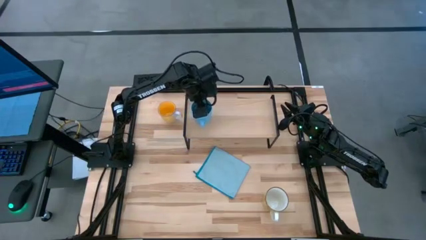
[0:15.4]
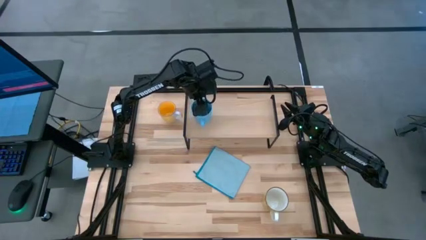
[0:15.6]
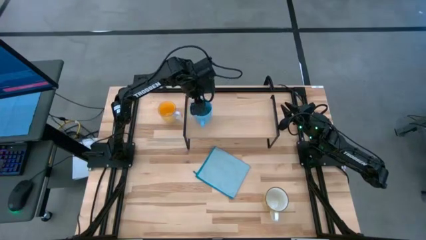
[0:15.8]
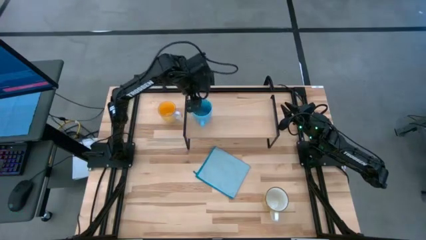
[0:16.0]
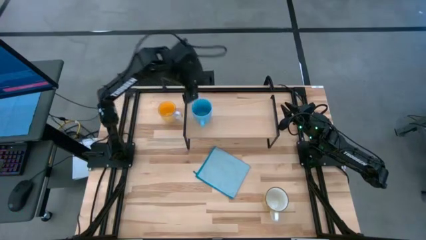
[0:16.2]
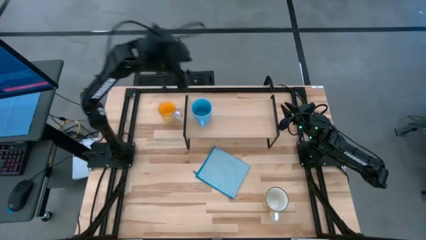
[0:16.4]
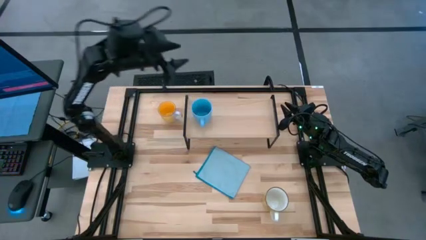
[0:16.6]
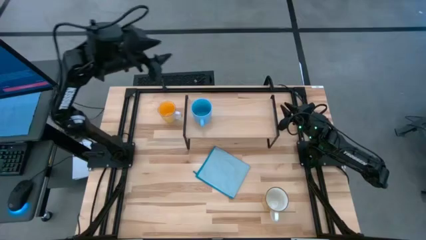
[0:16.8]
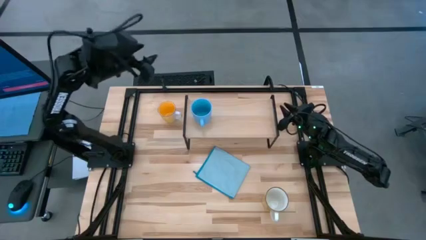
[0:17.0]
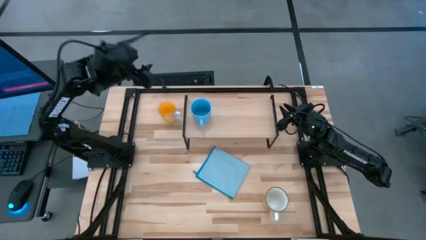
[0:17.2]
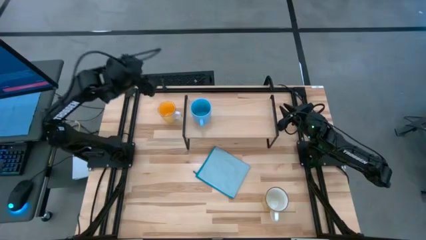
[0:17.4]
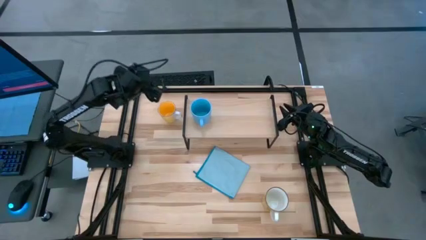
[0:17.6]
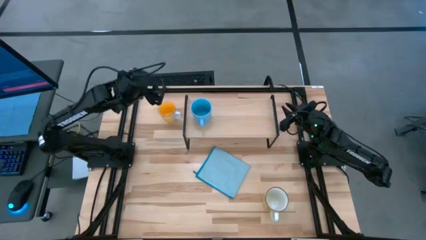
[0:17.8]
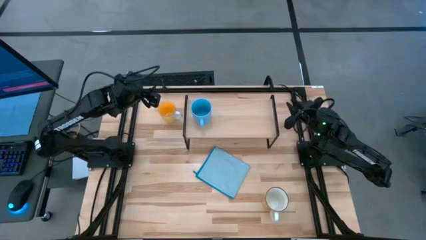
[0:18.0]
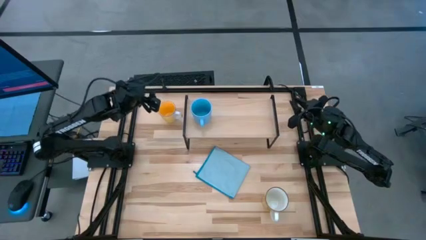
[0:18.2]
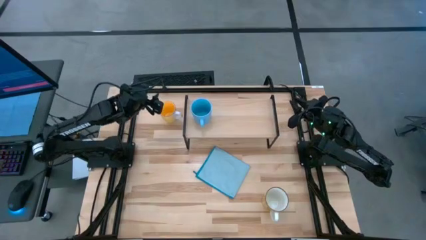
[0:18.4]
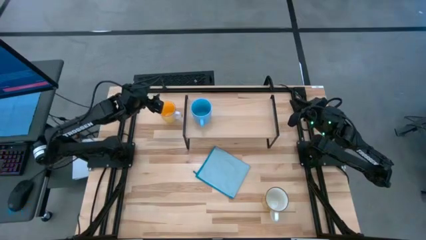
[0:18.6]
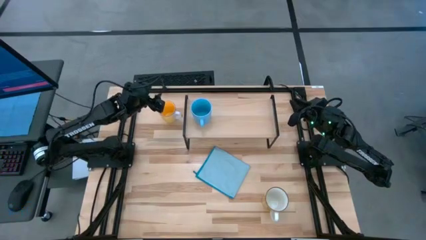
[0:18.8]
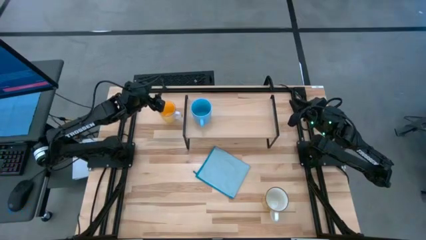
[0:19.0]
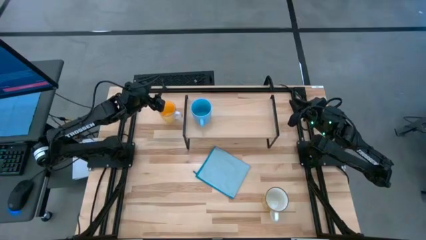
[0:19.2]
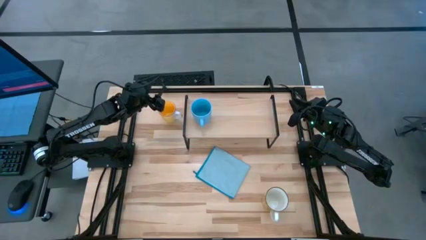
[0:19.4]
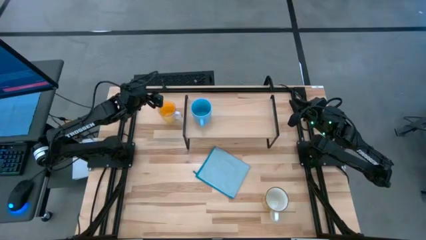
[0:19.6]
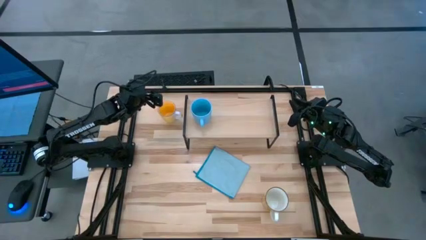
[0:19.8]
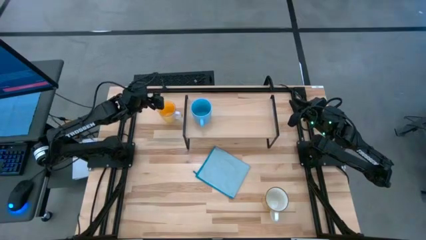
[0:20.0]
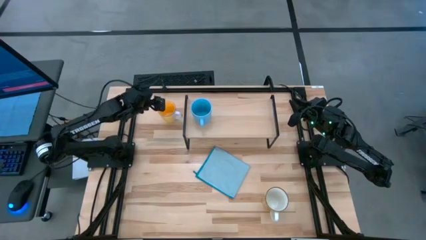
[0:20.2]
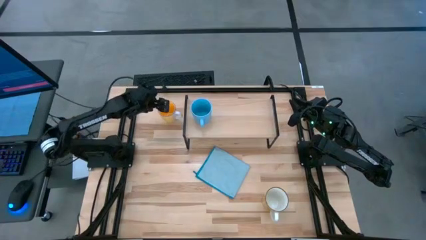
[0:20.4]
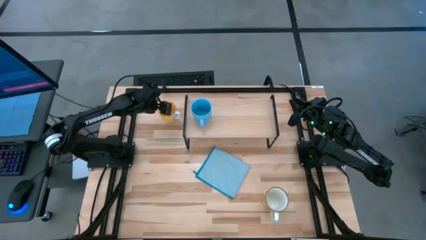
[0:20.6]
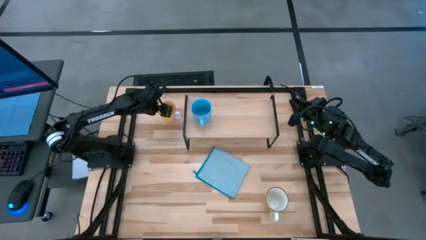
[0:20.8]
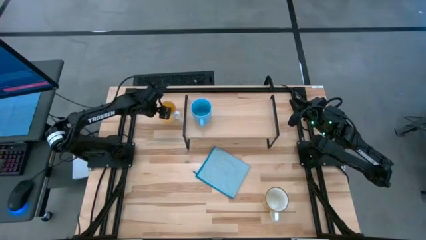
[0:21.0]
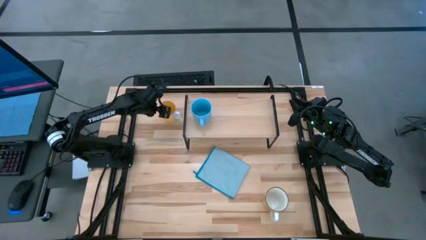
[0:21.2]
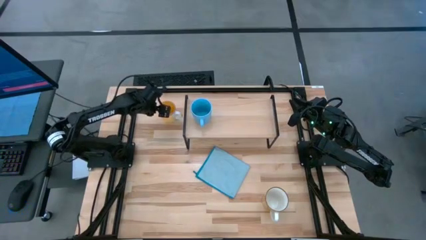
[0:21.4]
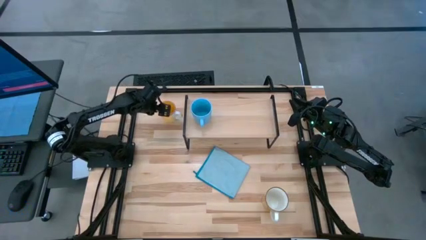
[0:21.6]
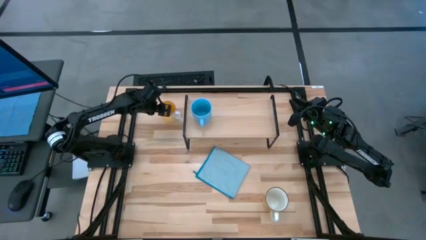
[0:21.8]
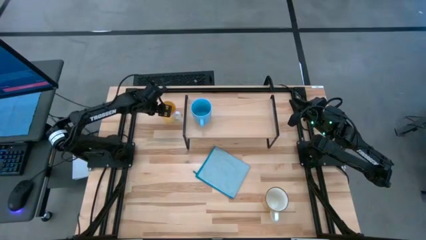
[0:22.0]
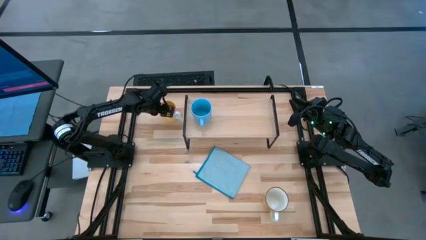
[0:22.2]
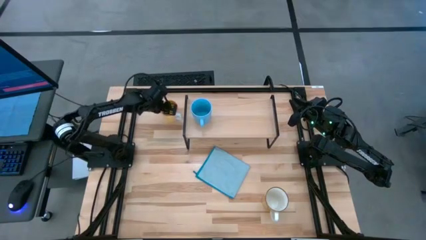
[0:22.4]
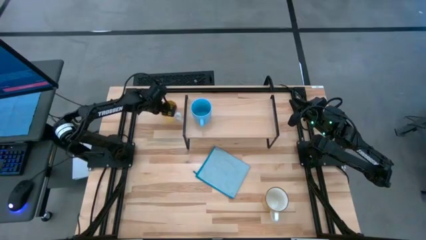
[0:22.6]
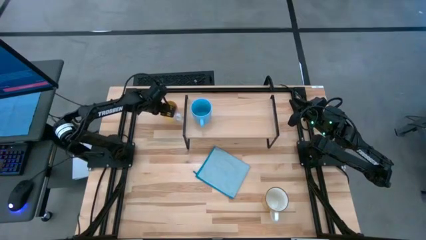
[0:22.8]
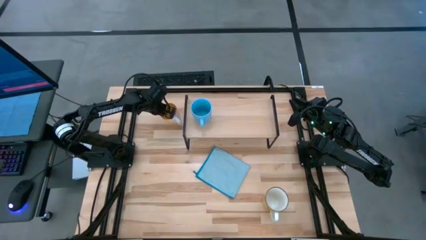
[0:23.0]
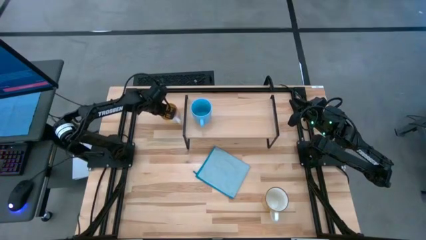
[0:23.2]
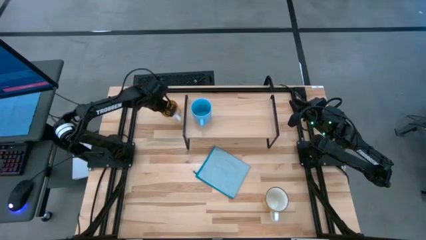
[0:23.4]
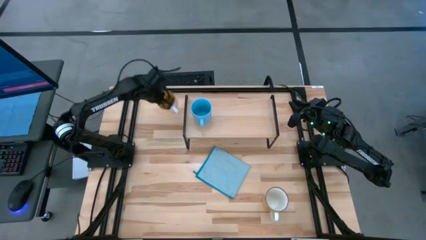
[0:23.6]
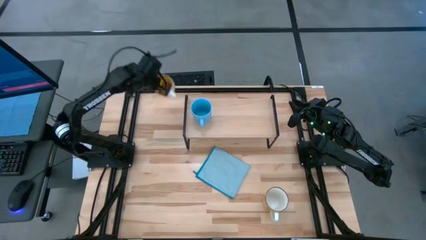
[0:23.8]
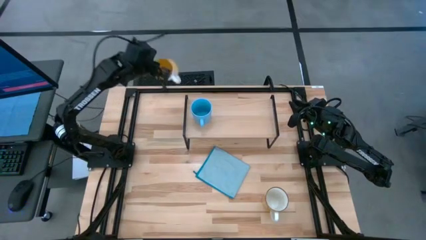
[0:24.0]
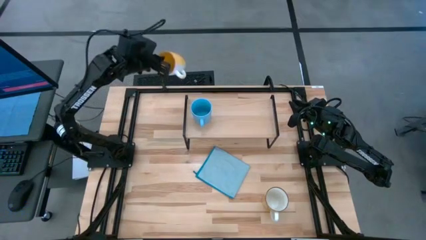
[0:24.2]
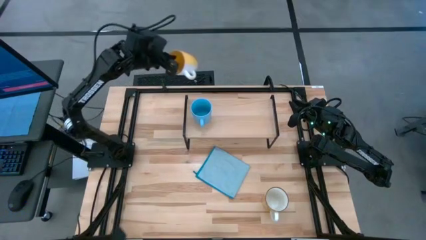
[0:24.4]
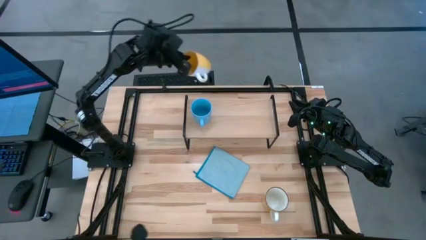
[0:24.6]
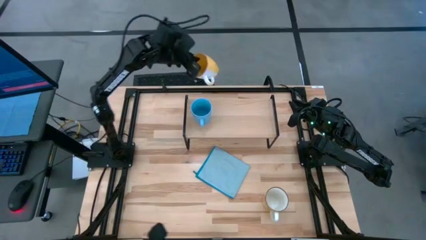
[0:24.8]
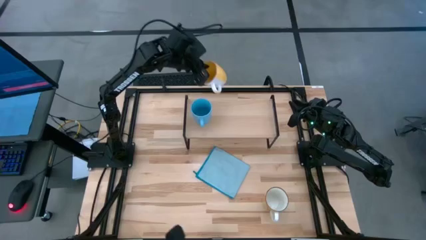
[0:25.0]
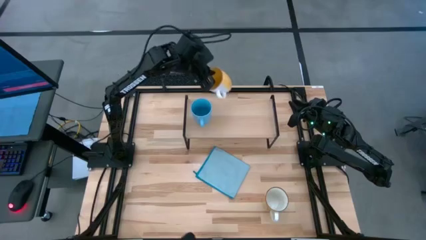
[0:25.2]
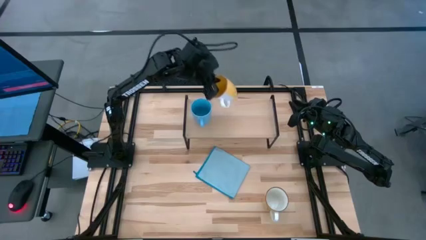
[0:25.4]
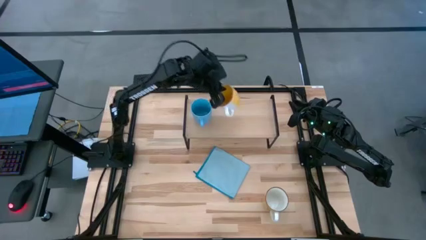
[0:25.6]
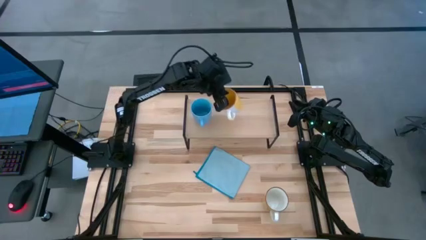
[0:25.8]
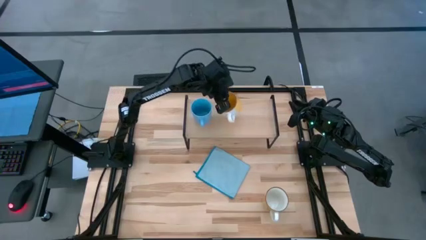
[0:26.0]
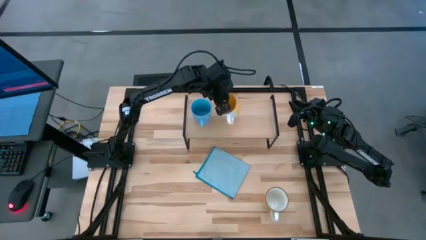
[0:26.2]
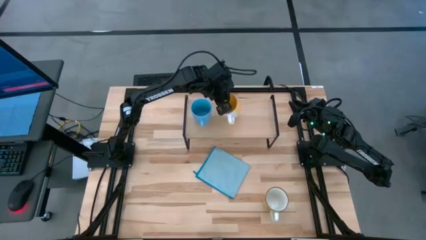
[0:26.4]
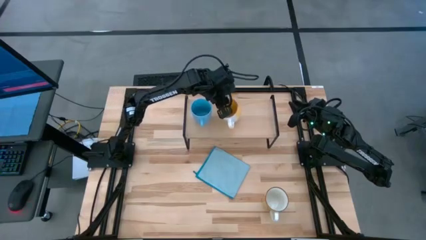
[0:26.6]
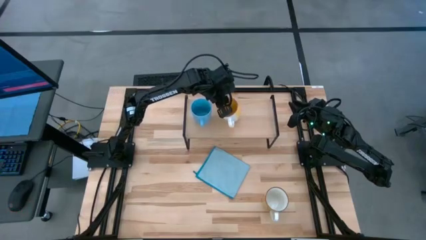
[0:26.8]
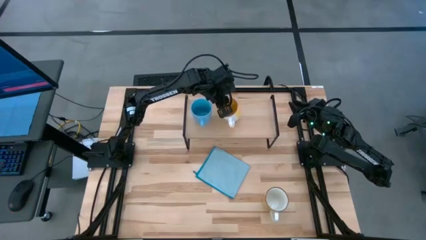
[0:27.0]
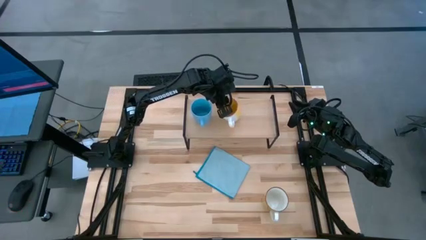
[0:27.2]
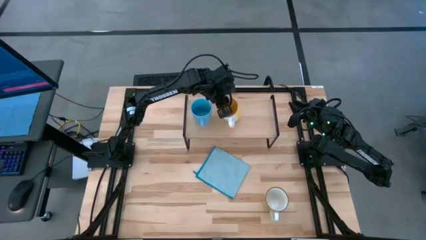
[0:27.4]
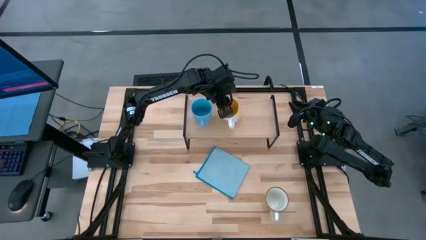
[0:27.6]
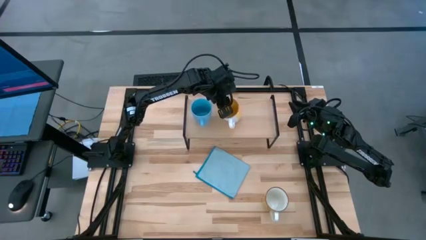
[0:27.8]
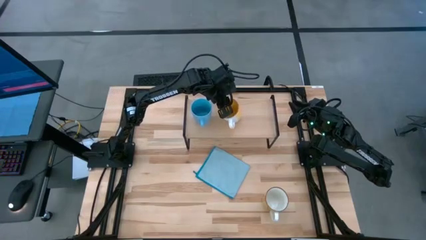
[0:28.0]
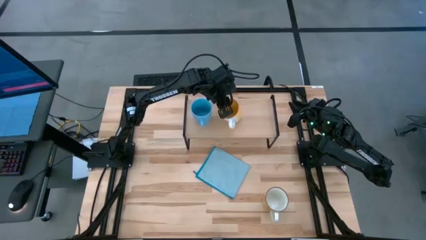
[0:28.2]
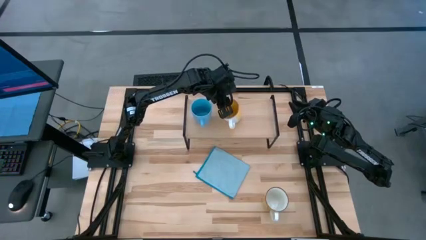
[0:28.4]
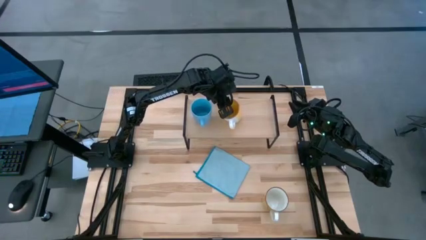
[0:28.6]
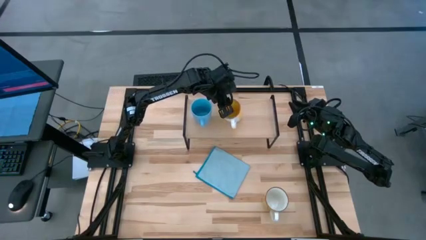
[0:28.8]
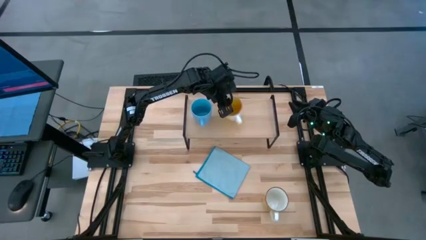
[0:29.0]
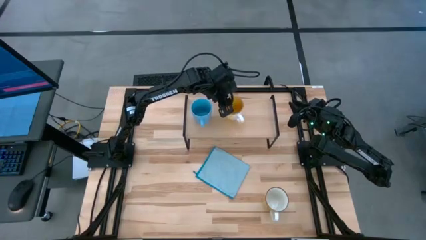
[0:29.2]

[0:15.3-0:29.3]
Task: Stack small to large cups/mugs on shelf
Put the yellow mug on the shelf

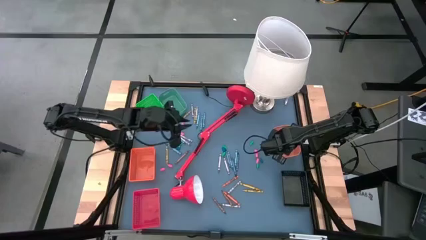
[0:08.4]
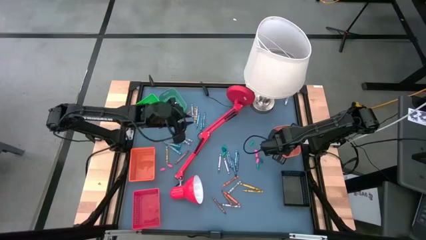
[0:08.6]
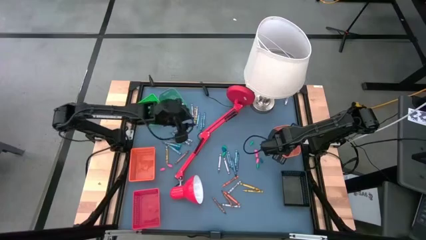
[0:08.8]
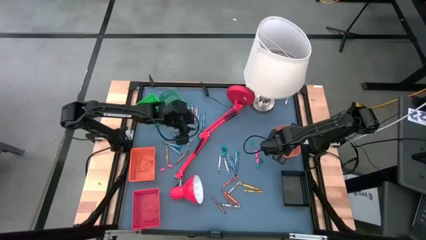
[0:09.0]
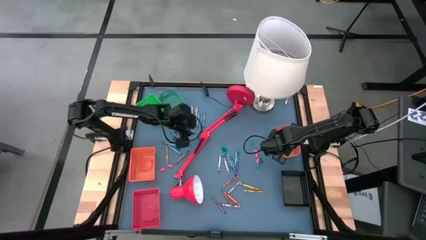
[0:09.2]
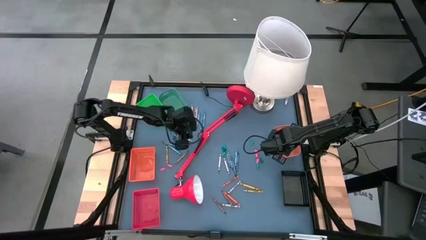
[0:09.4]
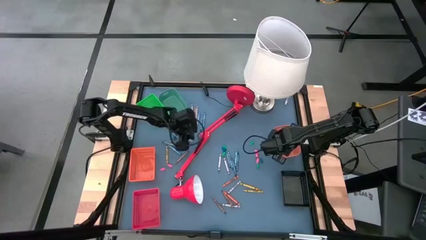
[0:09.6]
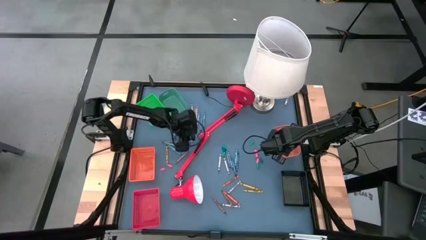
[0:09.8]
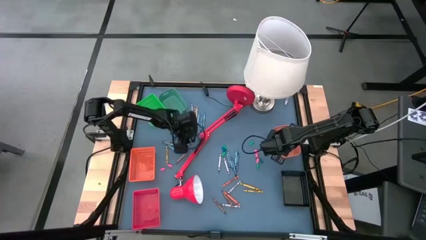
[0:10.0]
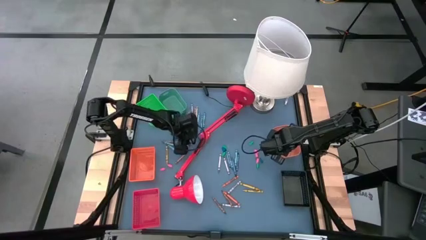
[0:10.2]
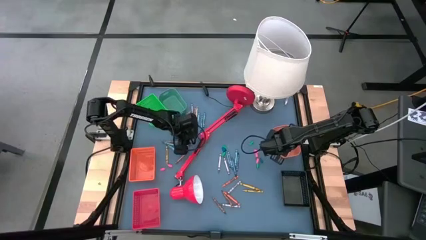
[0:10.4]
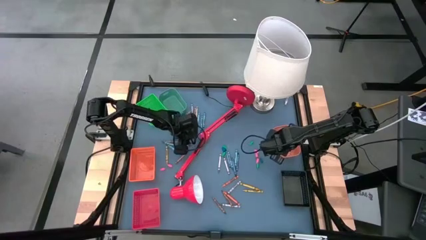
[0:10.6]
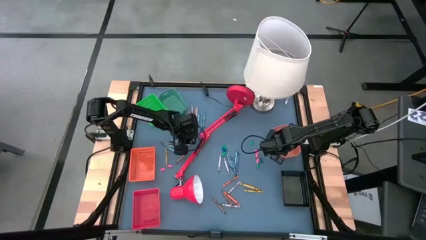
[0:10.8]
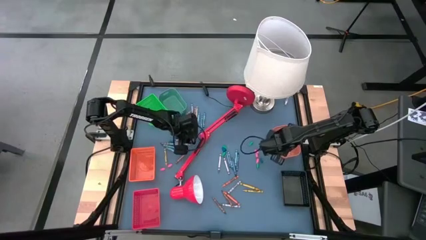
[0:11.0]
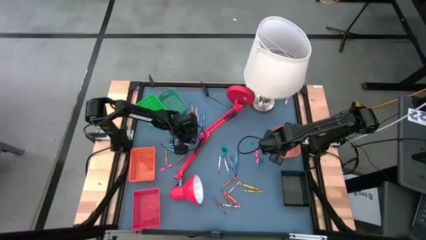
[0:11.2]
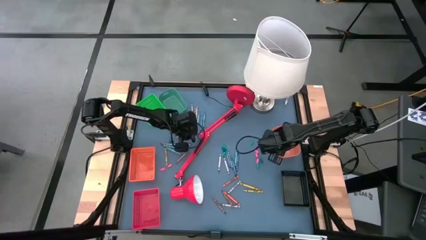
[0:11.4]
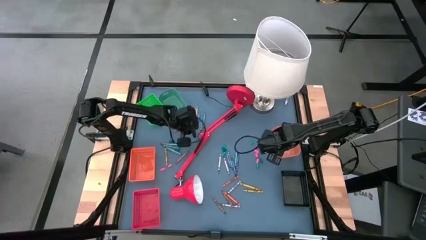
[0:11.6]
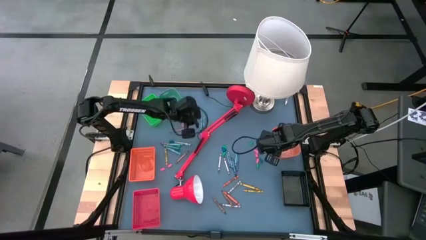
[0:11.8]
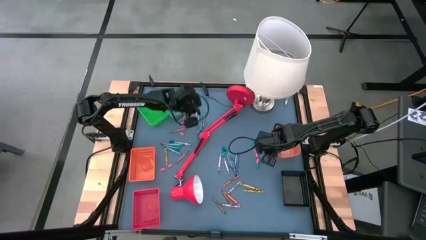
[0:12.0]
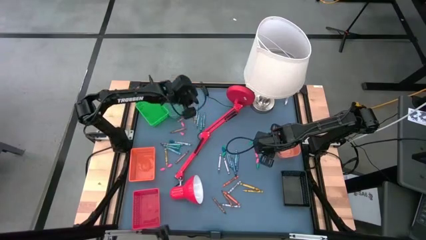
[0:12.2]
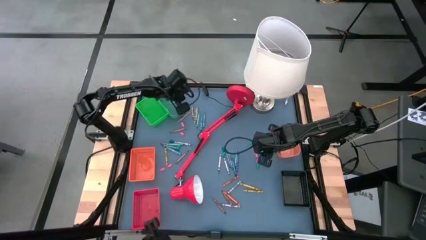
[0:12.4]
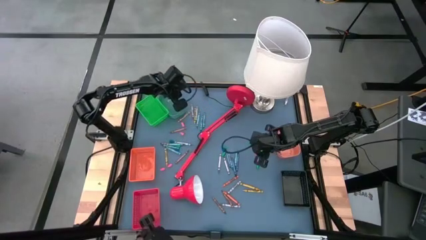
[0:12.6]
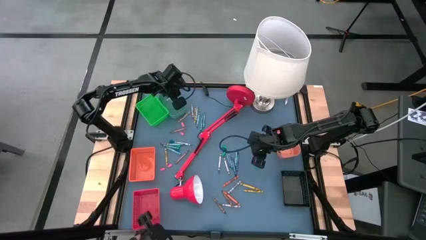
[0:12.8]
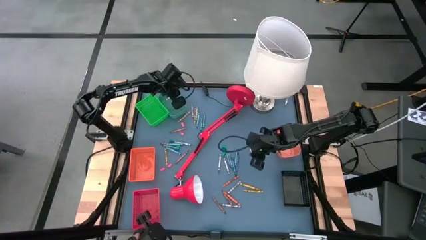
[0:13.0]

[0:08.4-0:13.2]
Task: Sort crayons
Put the gray crayon into the blue bin
